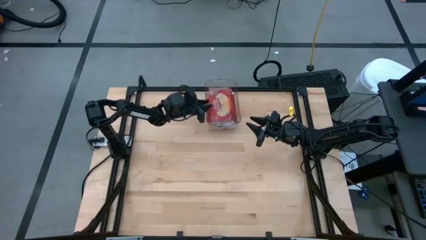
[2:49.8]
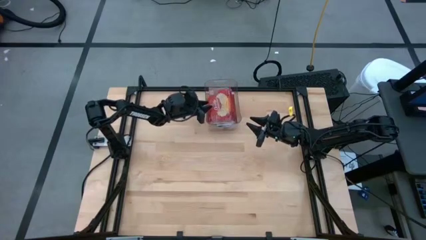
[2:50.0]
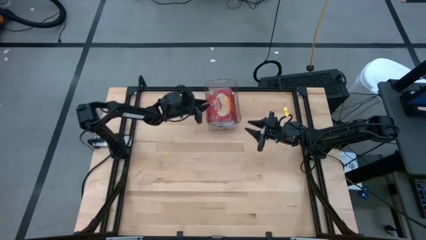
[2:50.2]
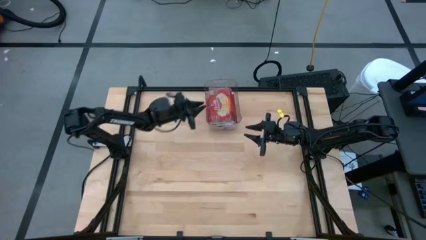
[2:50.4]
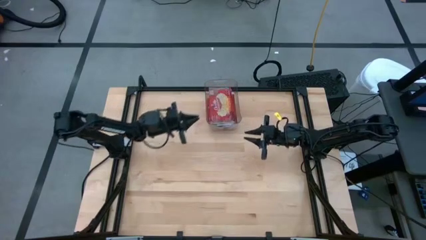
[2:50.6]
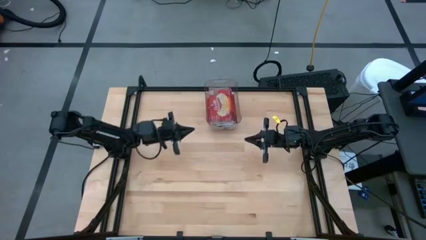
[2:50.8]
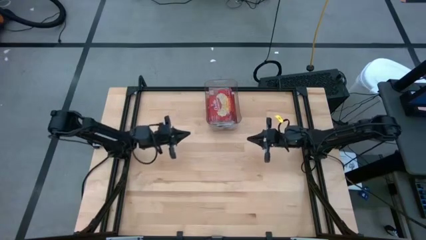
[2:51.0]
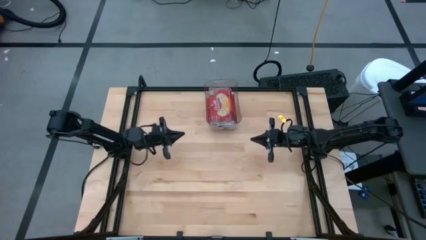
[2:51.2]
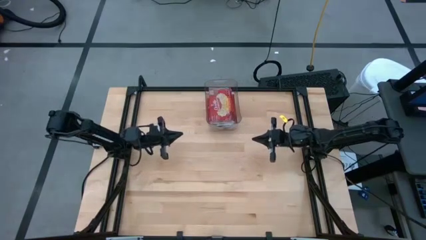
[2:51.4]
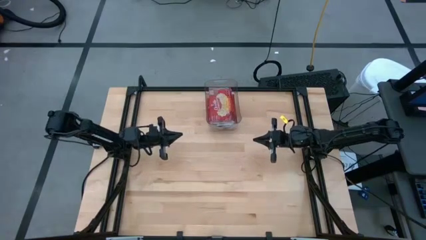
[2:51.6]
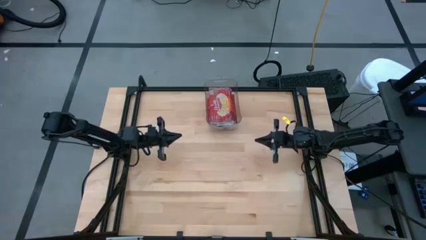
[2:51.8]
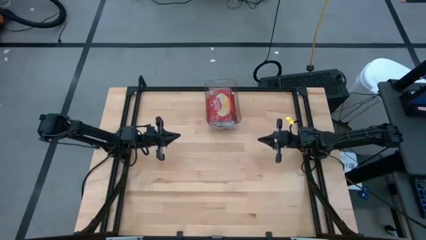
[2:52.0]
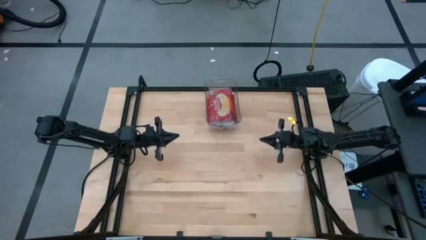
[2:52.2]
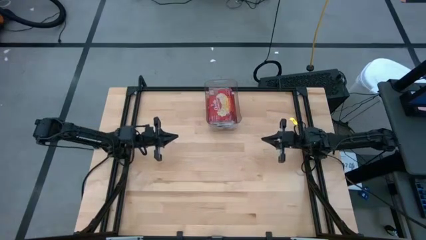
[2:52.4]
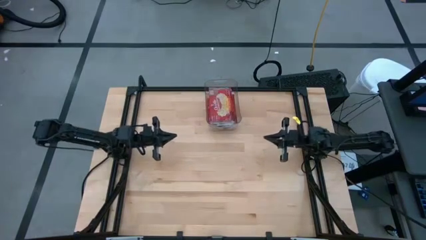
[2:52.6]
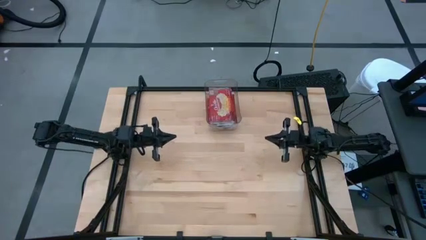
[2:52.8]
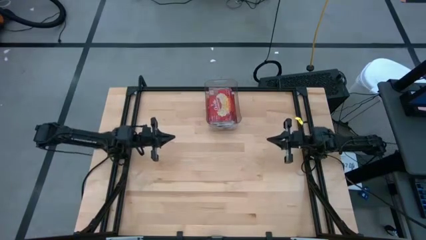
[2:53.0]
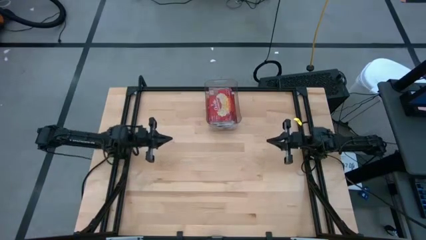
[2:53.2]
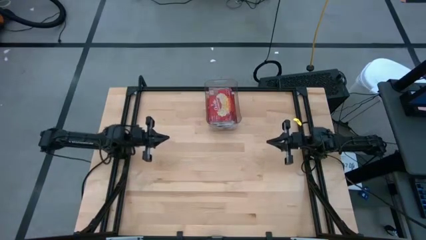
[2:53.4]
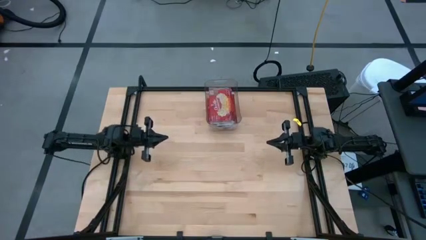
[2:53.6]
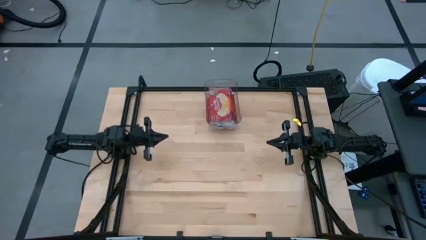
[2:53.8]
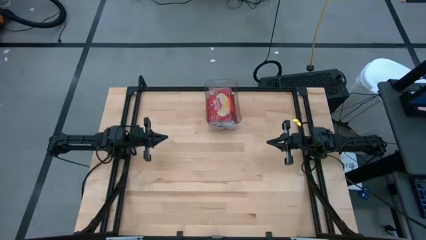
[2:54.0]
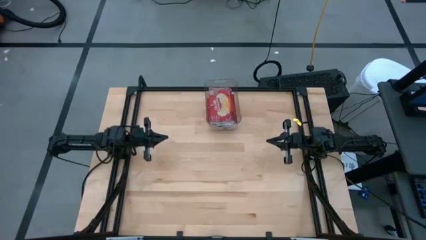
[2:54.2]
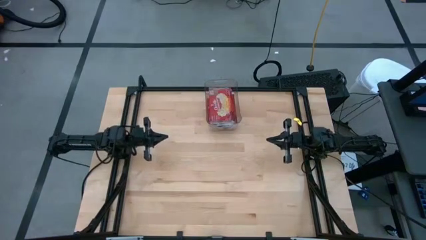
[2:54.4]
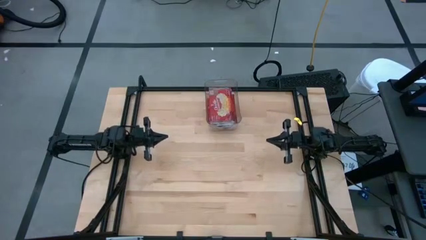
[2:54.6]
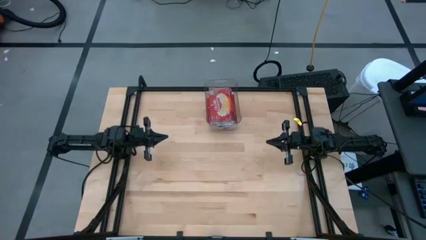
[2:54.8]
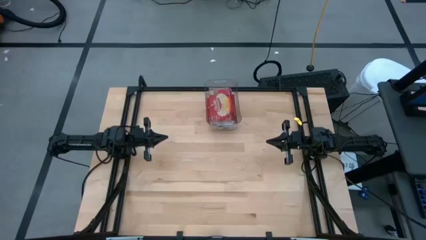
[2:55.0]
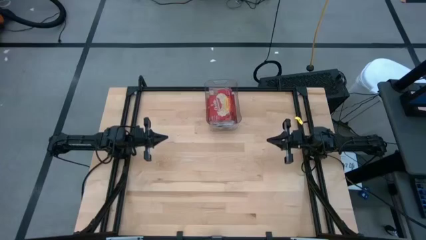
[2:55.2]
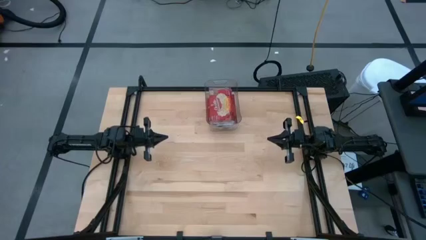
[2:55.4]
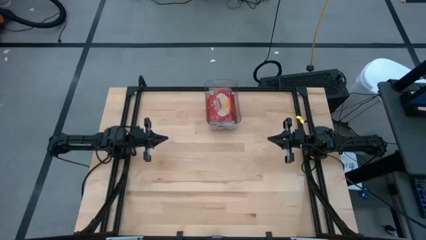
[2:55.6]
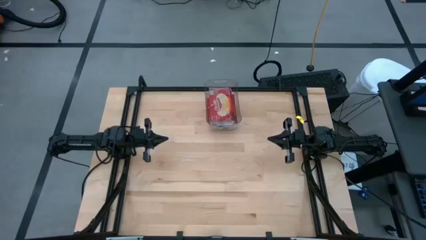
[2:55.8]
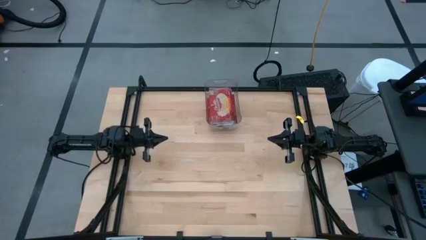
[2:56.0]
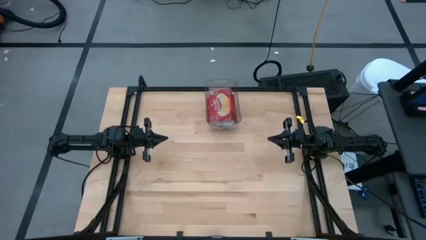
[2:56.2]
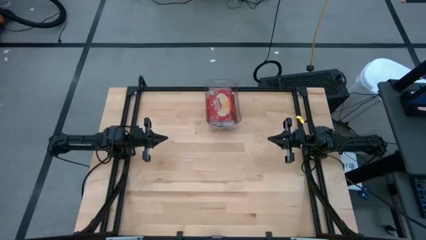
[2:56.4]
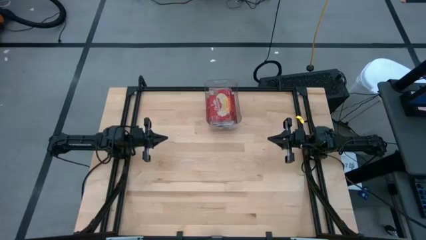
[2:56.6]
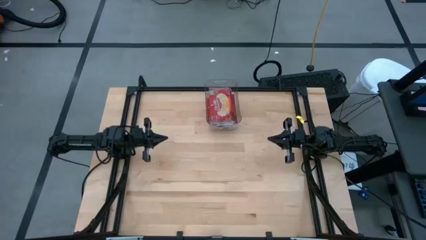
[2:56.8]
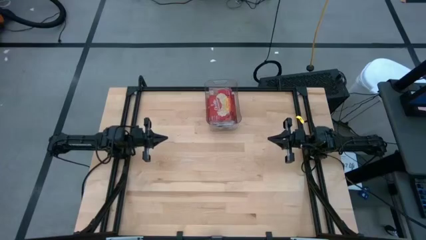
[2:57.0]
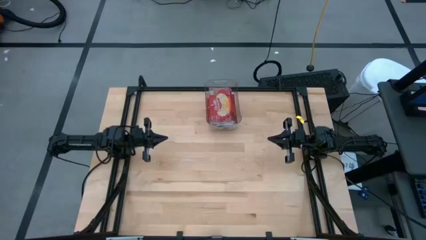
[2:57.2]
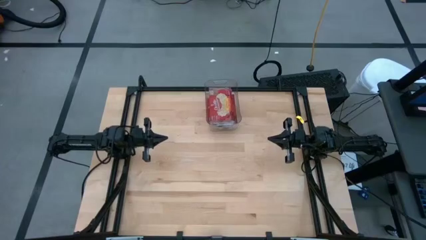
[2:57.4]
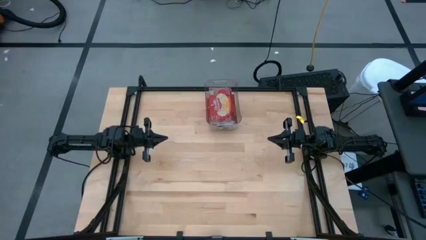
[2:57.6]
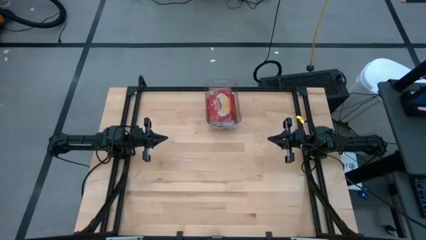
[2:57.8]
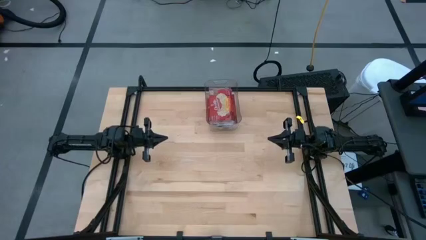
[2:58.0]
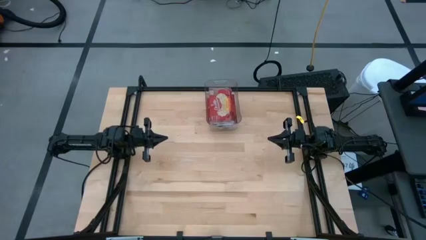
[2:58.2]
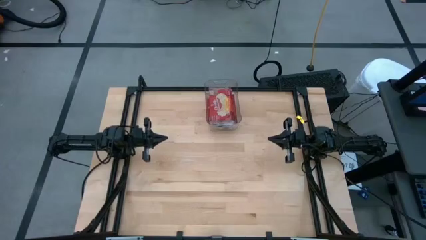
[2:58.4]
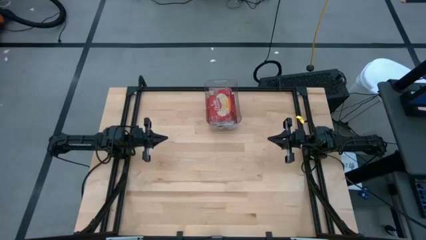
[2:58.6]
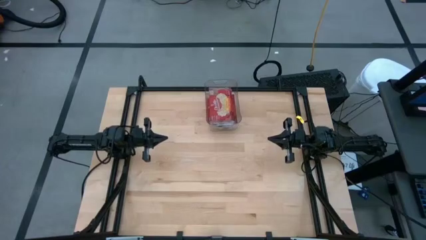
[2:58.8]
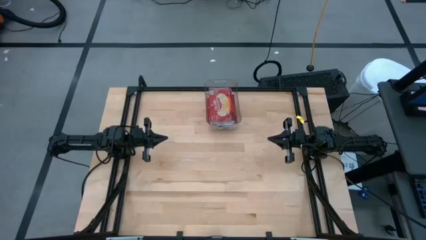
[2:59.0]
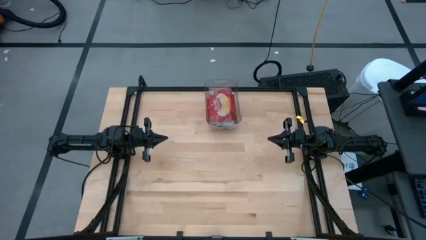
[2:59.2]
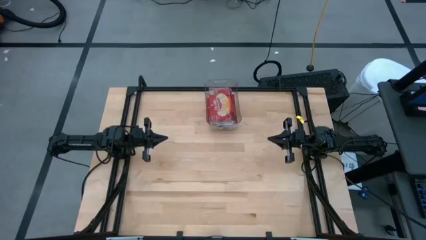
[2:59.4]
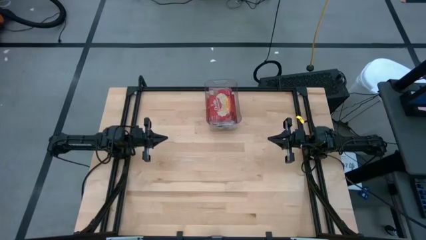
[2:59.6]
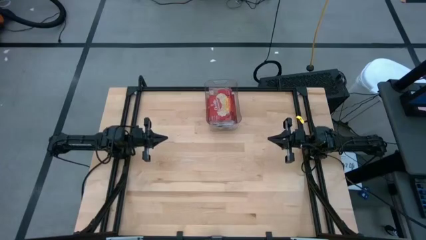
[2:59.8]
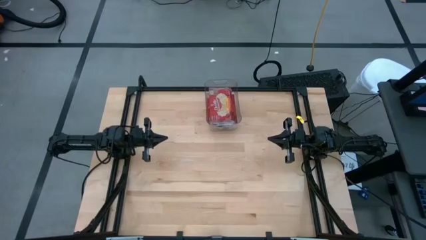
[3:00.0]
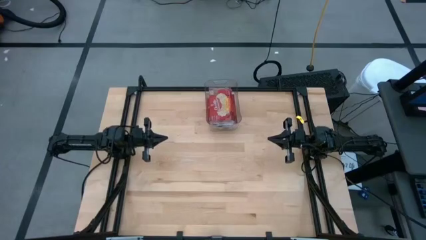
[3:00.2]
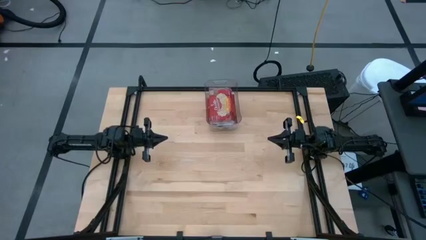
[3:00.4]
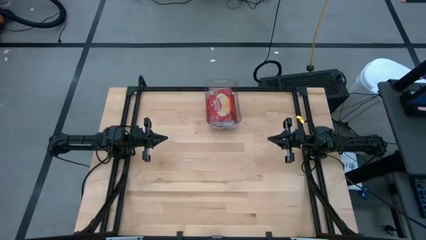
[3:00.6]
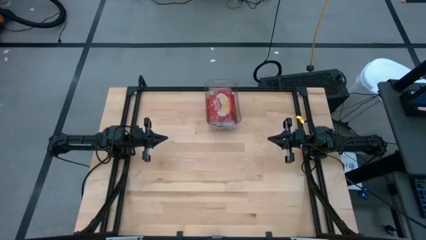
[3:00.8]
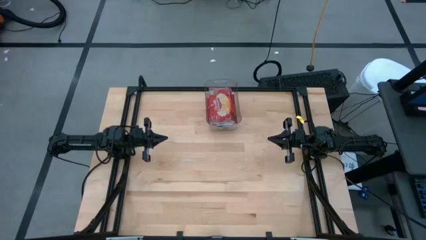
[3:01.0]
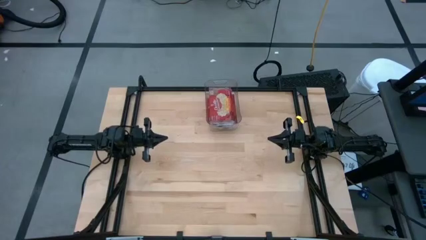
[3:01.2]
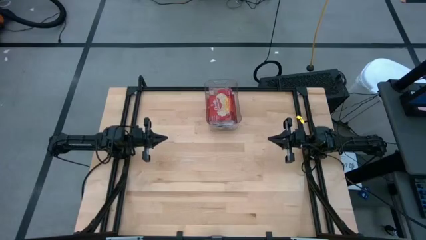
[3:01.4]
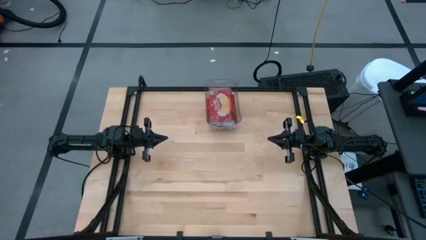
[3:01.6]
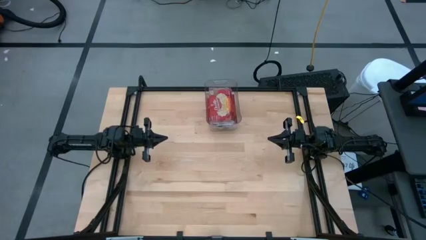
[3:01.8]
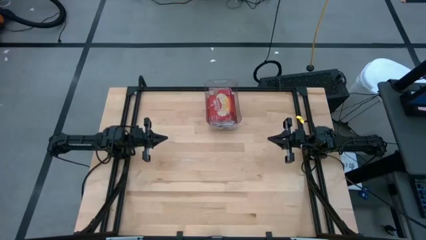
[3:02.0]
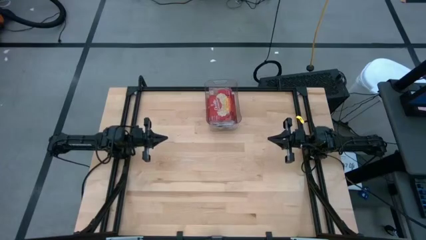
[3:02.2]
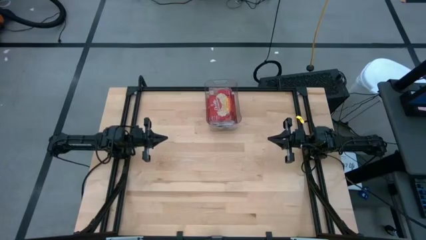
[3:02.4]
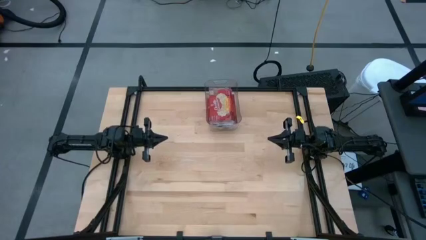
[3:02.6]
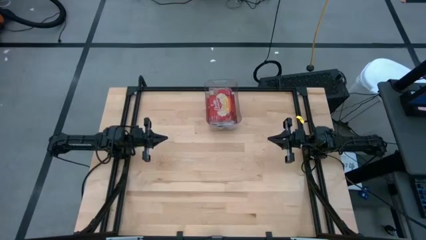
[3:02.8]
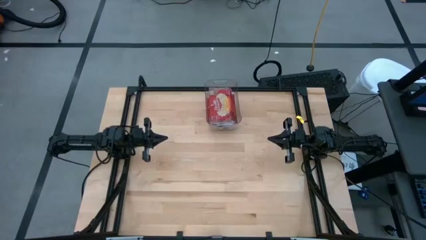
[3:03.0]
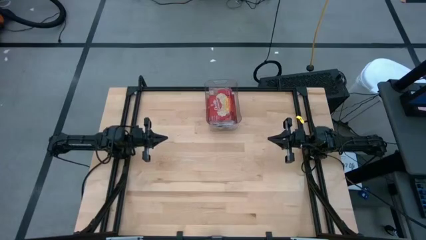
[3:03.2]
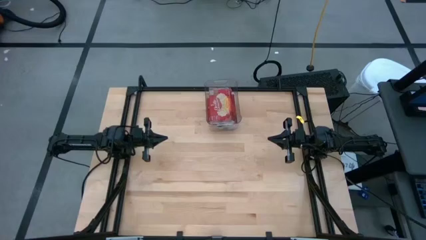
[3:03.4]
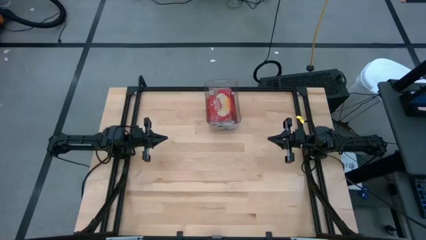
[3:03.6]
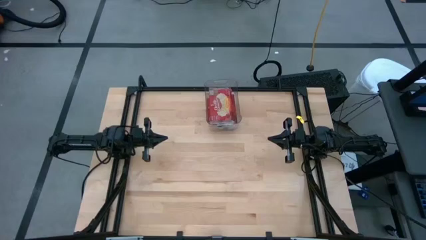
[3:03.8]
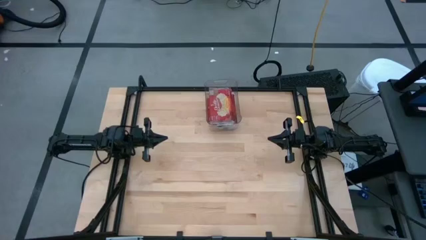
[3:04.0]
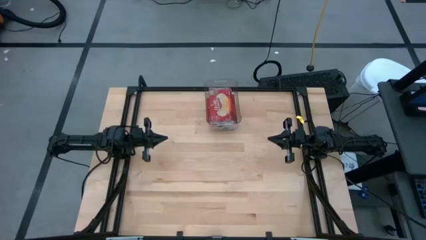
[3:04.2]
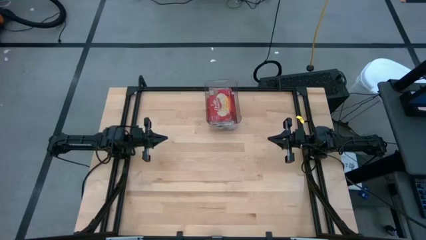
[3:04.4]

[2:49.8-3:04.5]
Task: Sort popcorn bags into baskets
Return to Home Position
